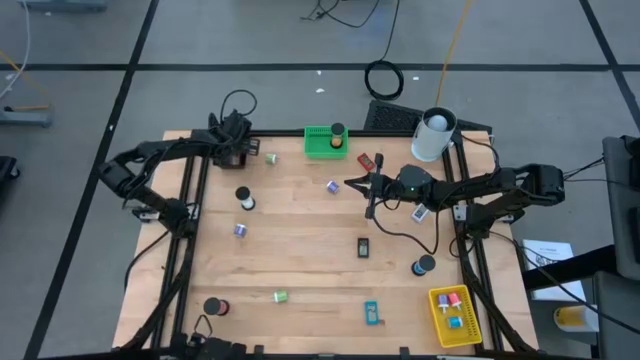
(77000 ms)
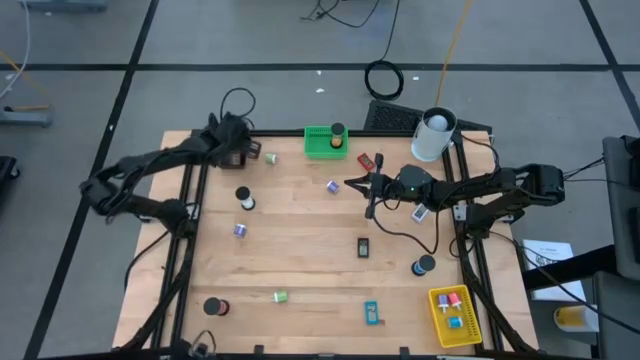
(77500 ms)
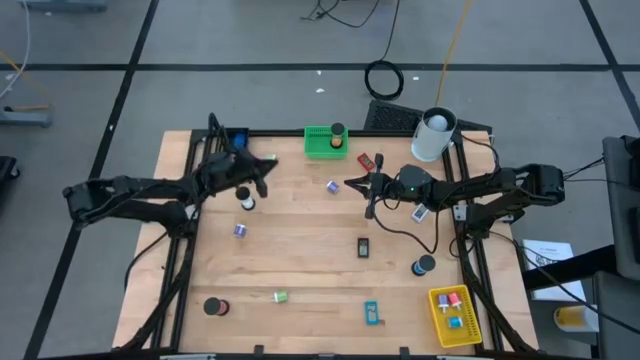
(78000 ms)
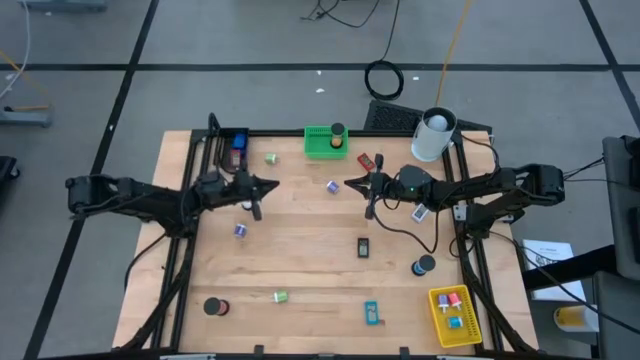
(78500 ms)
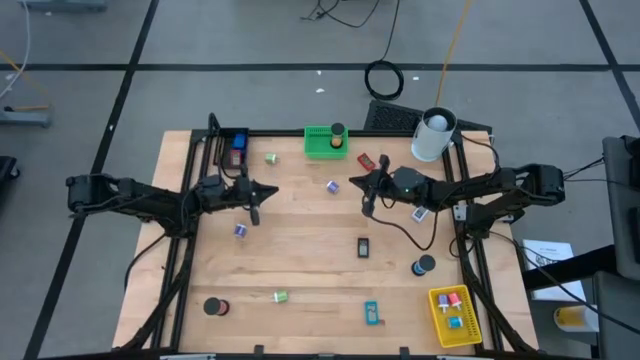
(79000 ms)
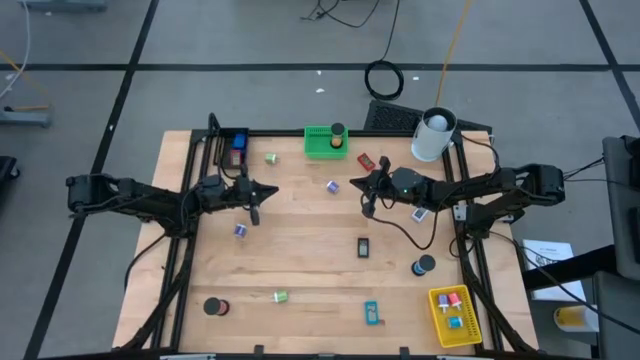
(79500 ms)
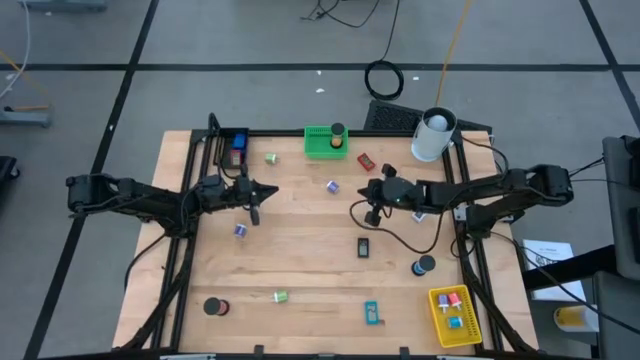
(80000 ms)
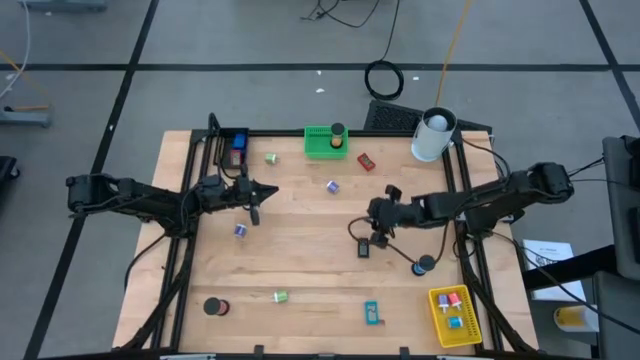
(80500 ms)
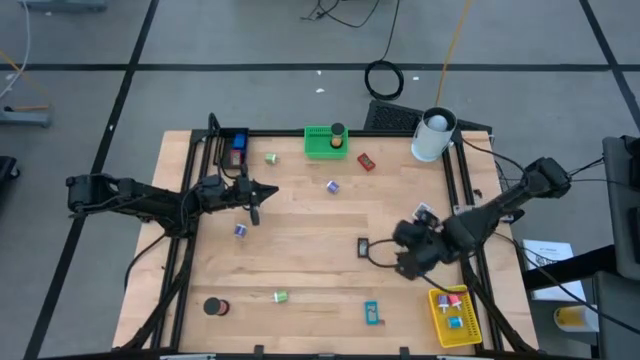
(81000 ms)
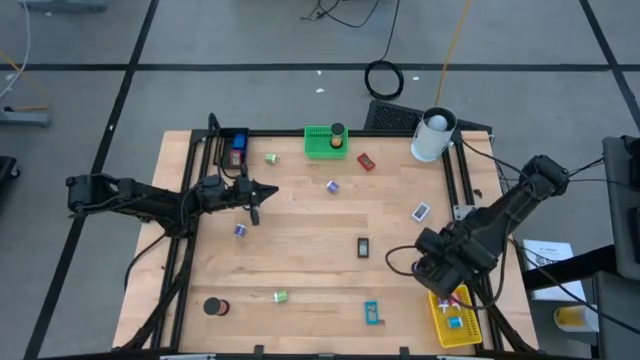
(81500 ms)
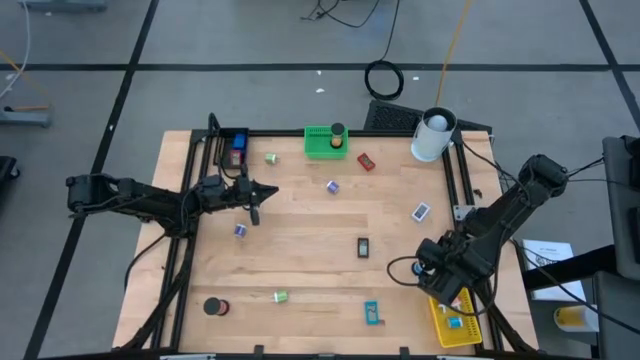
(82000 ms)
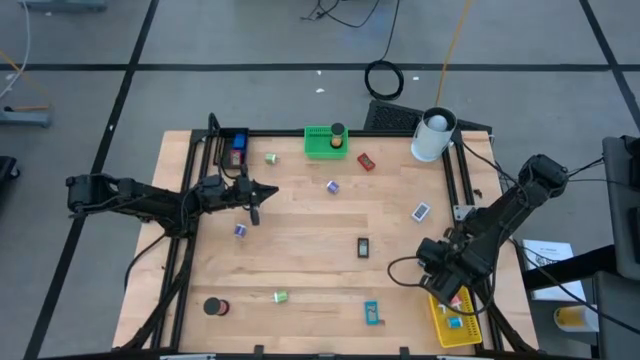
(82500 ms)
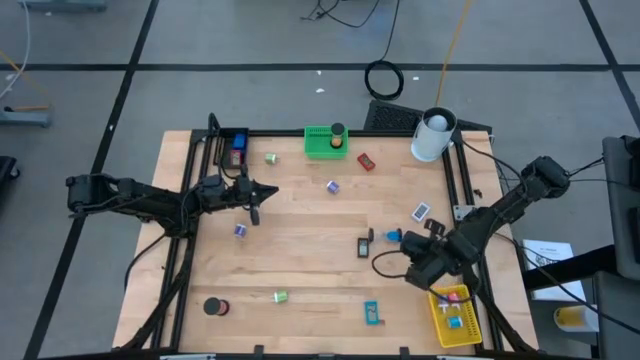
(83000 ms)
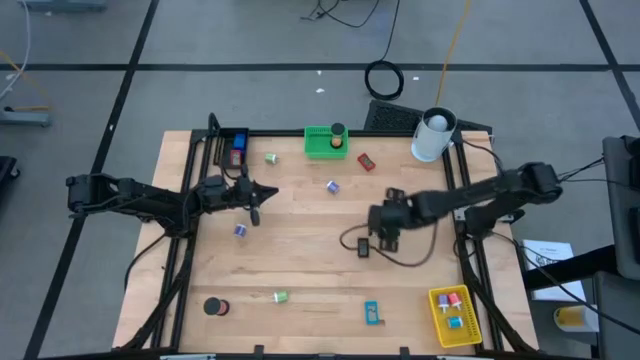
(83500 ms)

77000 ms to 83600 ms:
Task: Pick & Place Office items
Put the blue hourglass into the green basket

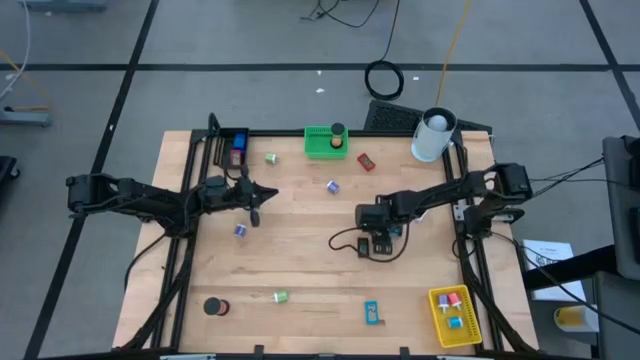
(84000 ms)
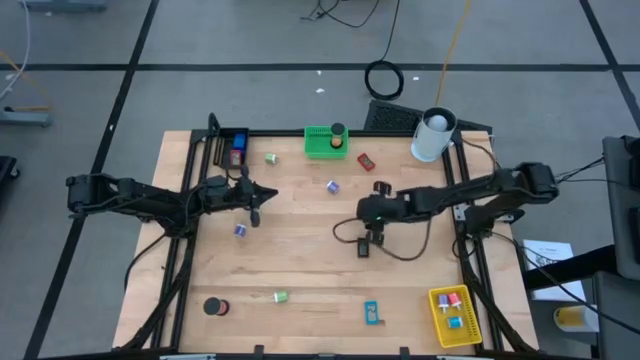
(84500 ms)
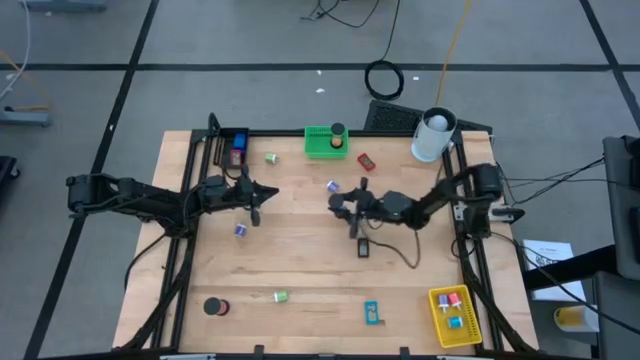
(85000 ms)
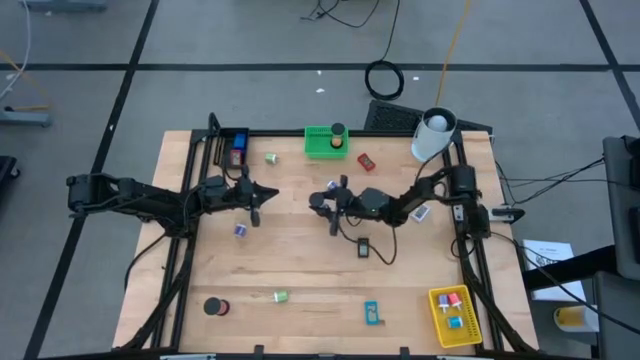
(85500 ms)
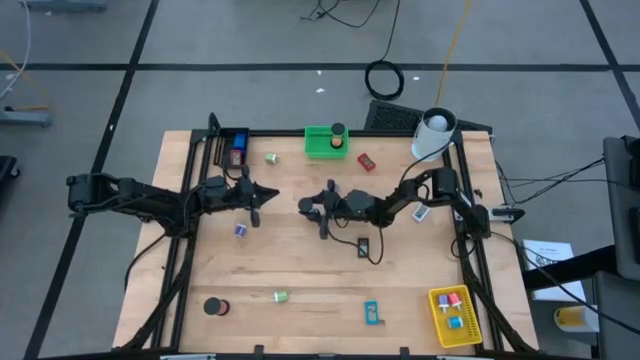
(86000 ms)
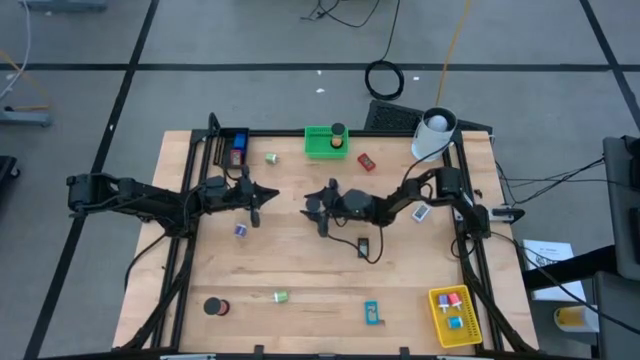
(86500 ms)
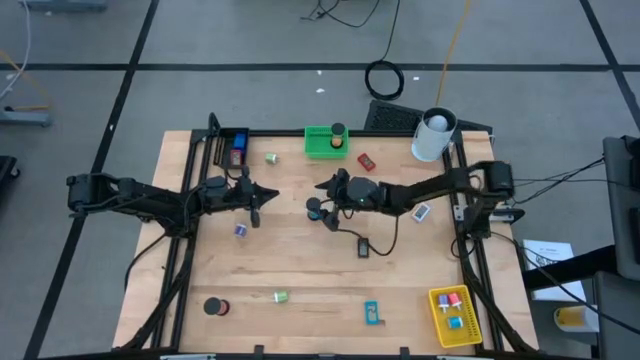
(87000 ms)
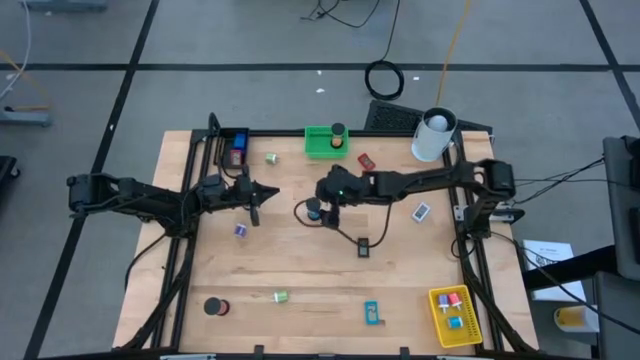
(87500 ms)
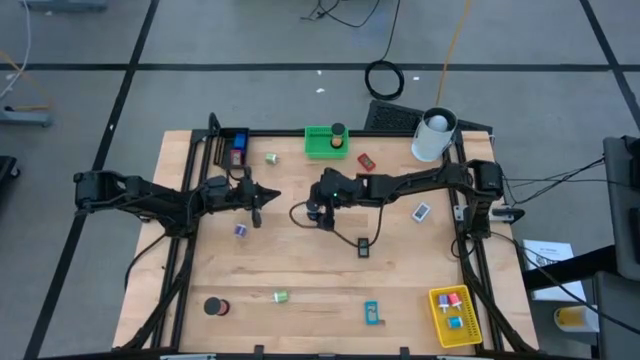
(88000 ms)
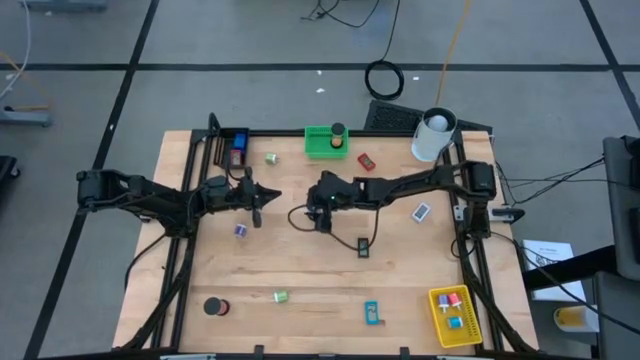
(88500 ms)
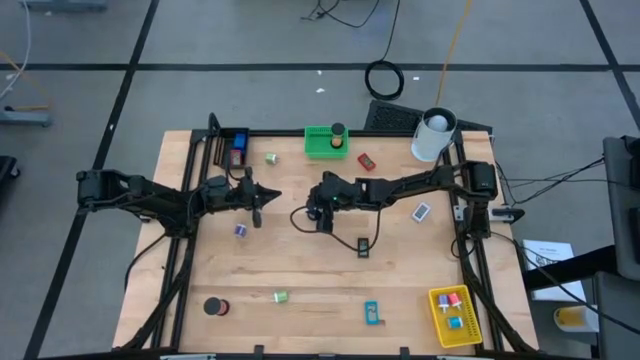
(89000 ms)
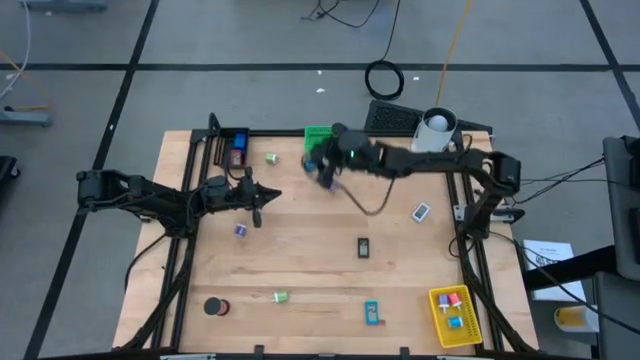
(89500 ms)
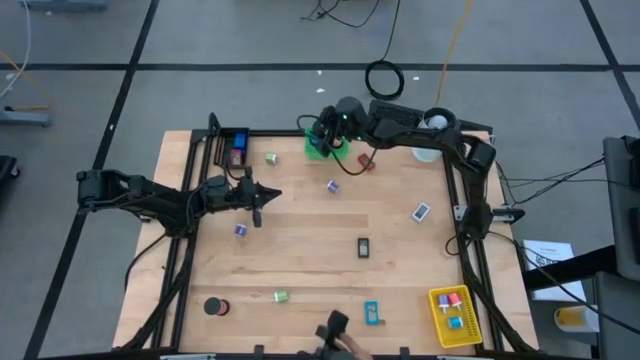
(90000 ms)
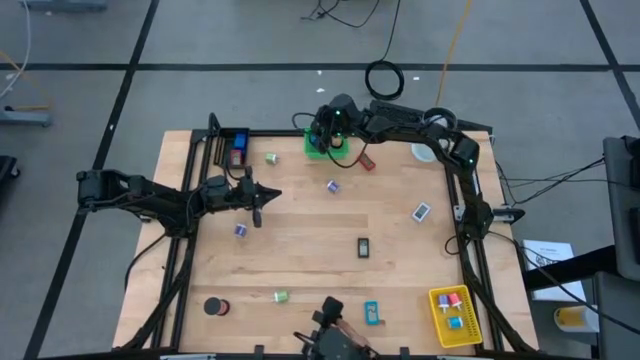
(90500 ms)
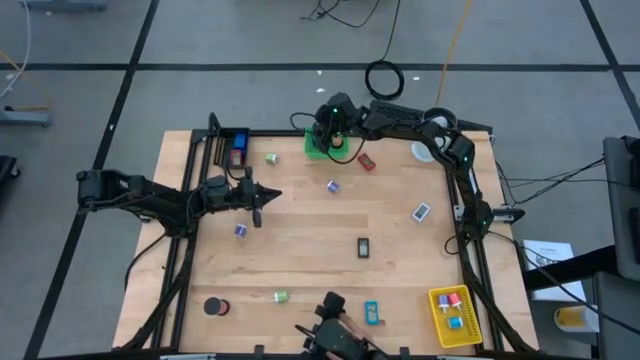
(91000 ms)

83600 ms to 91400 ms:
Put the blue hourglass into the green basket

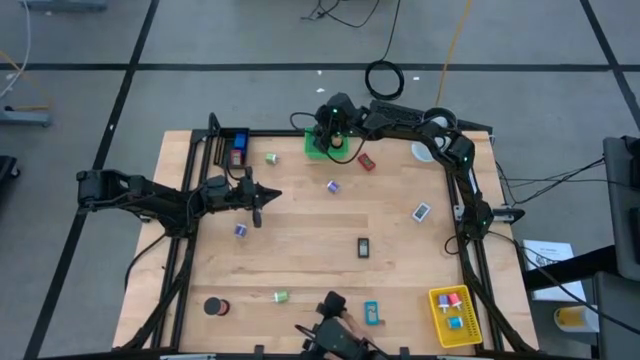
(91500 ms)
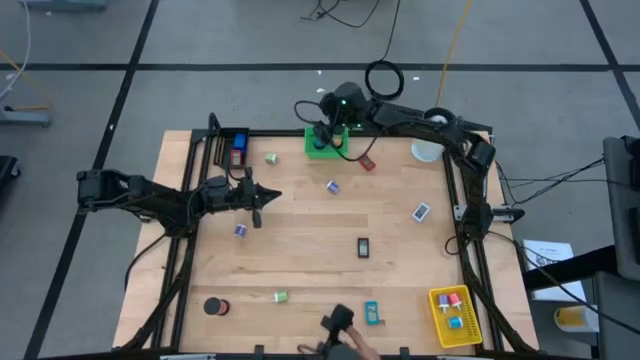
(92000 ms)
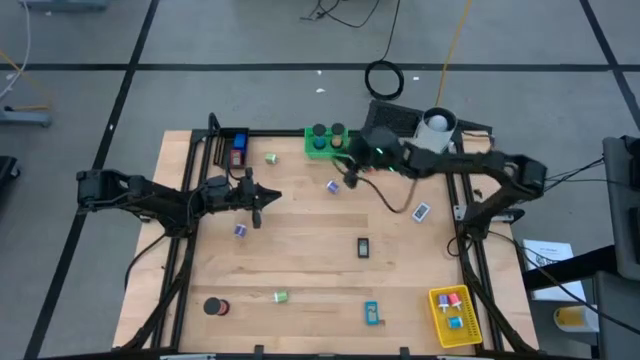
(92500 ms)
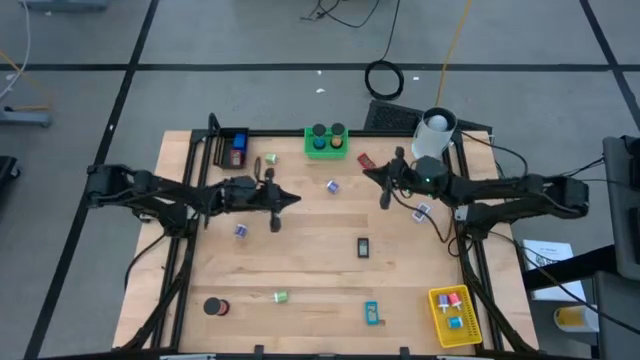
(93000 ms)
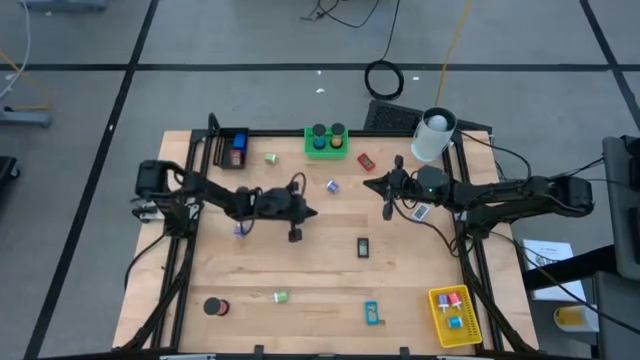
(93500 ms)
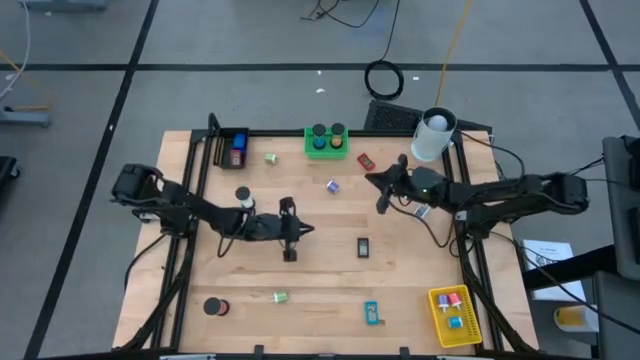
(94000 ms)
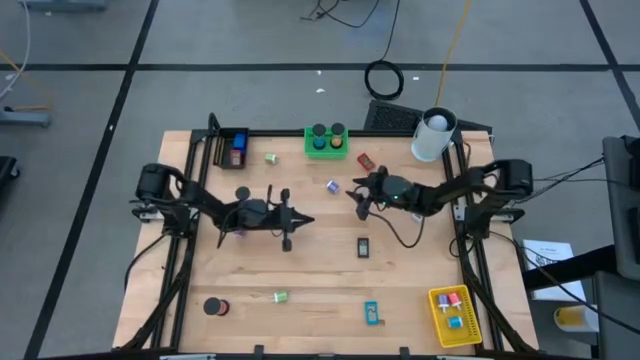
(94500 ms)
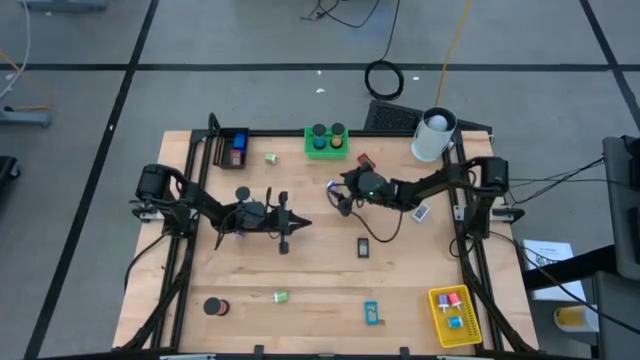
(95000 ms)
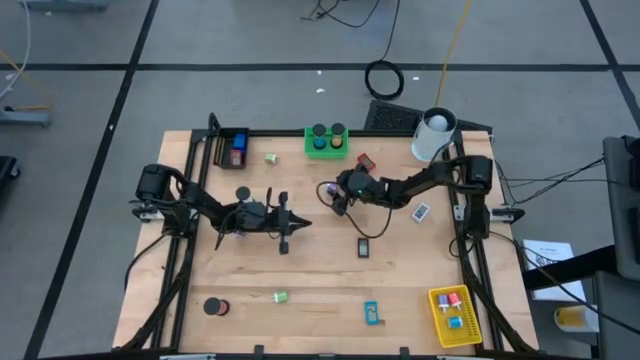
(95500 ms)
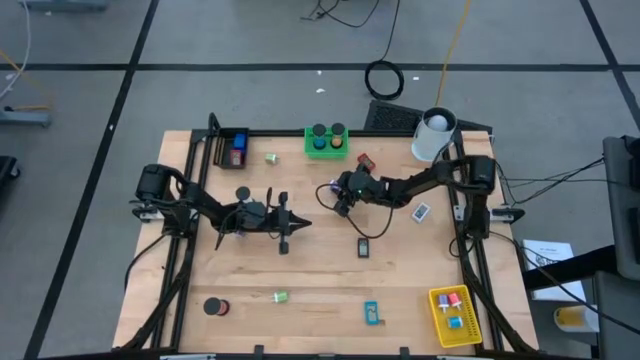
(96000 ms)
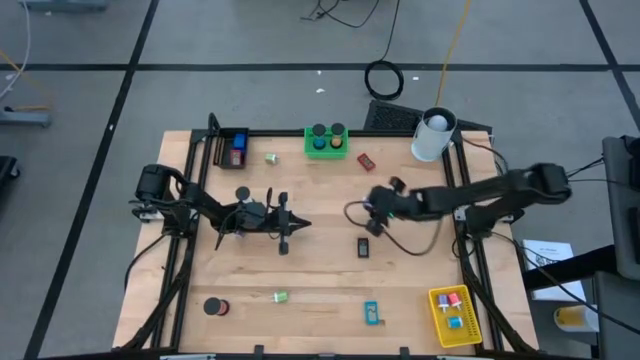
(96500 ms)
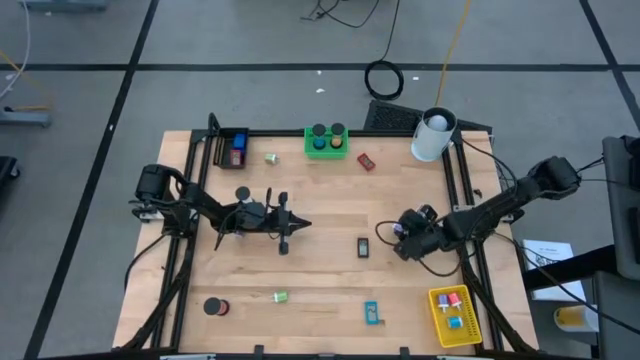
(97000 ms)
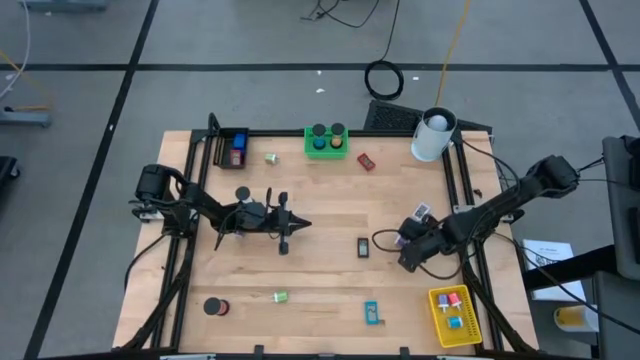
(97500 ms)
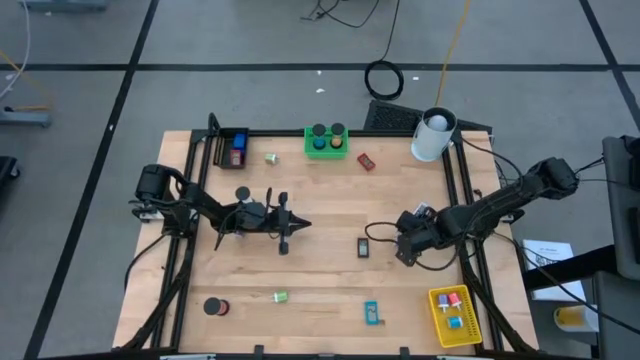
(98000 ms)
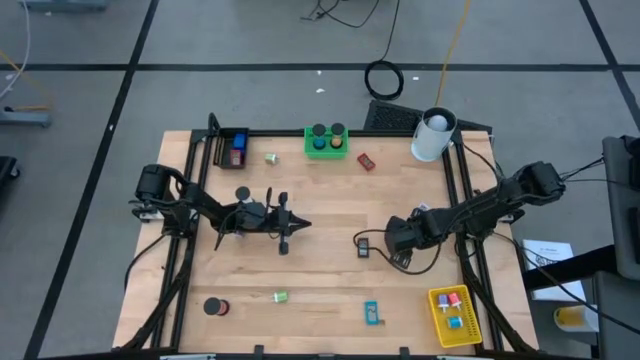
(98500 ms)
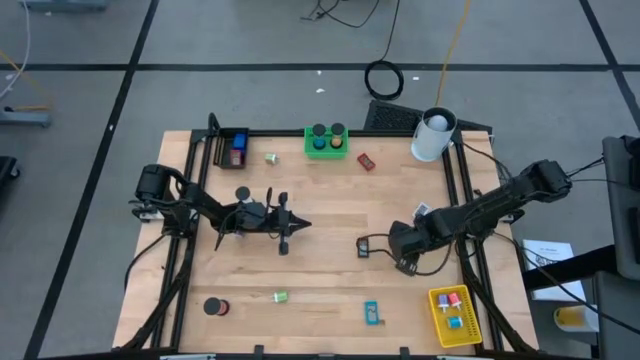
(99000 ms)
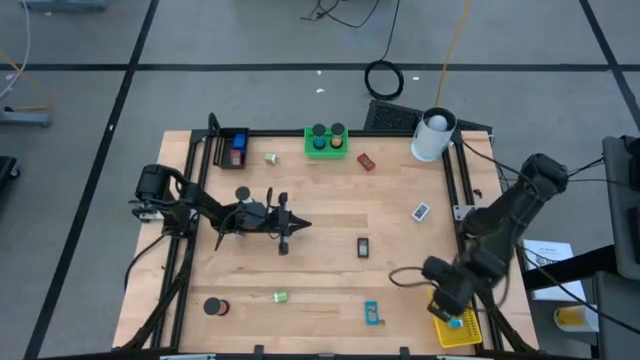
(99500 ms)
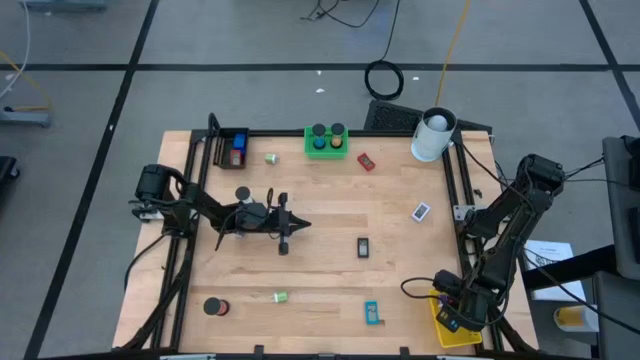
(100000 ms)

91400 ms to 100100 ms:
Put the right purple charger adapter into the yellow basket
